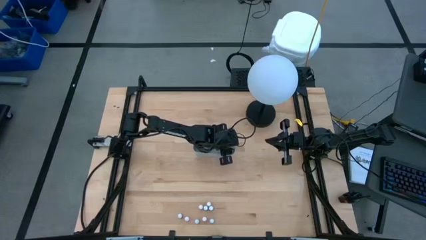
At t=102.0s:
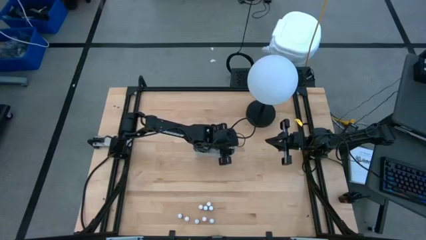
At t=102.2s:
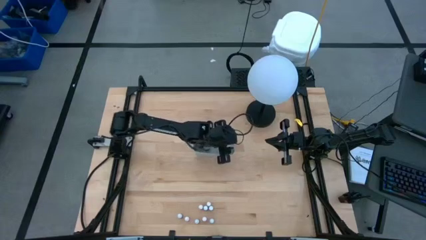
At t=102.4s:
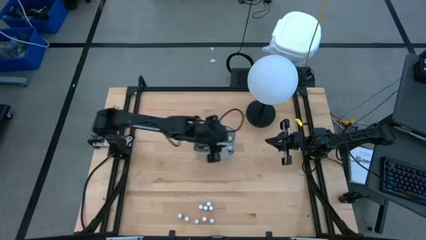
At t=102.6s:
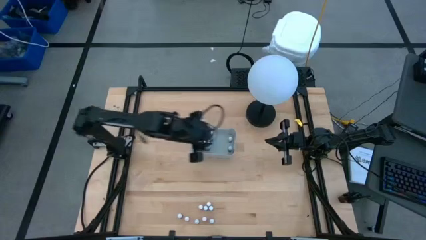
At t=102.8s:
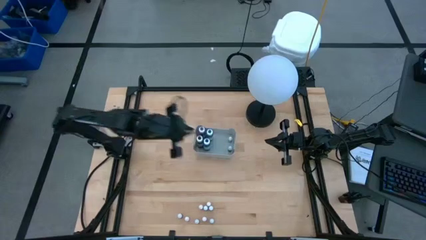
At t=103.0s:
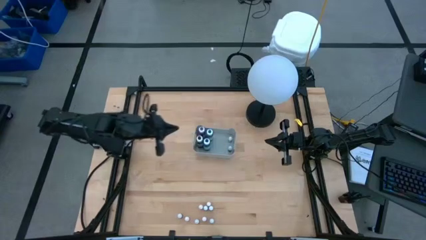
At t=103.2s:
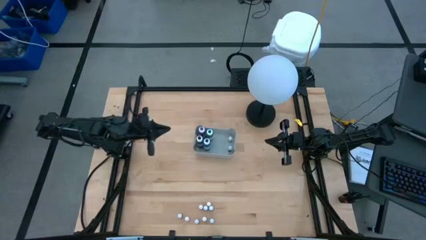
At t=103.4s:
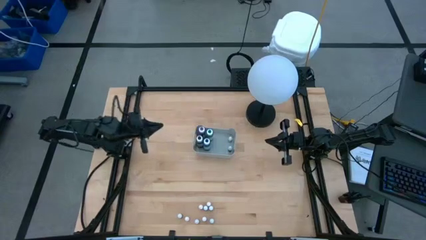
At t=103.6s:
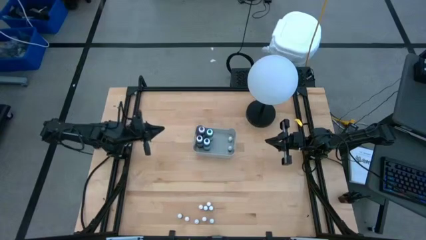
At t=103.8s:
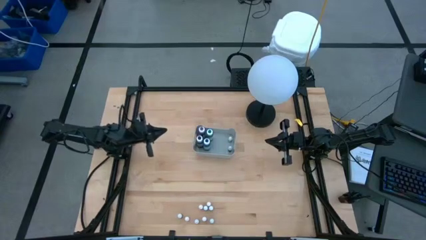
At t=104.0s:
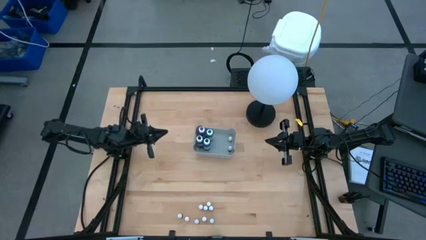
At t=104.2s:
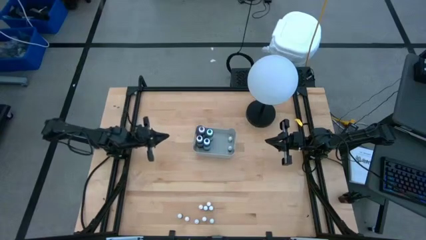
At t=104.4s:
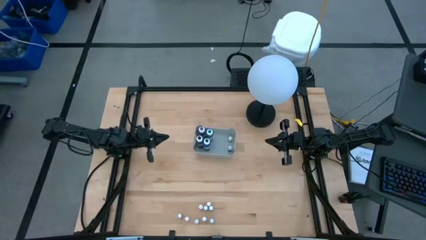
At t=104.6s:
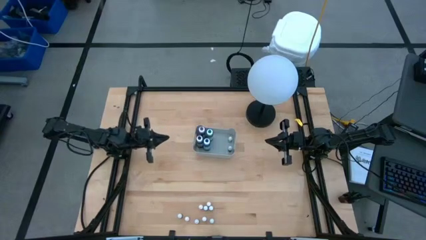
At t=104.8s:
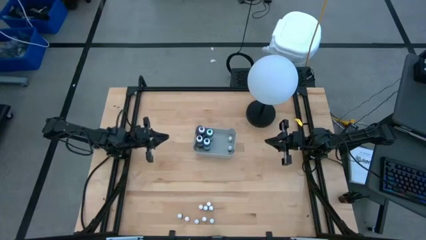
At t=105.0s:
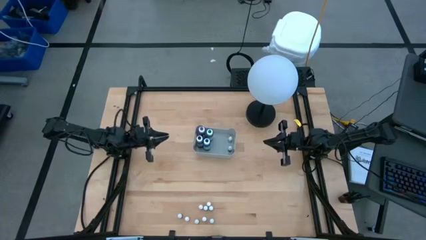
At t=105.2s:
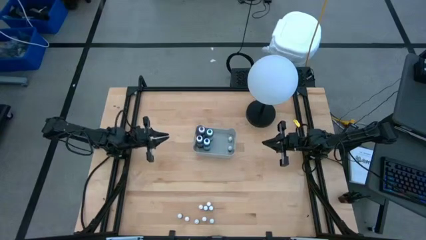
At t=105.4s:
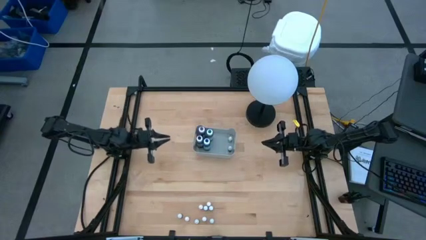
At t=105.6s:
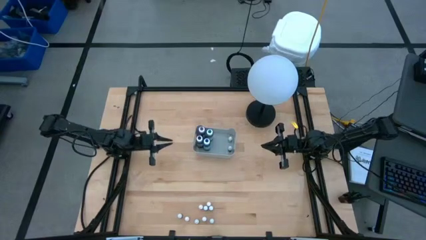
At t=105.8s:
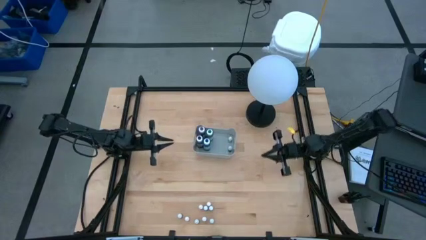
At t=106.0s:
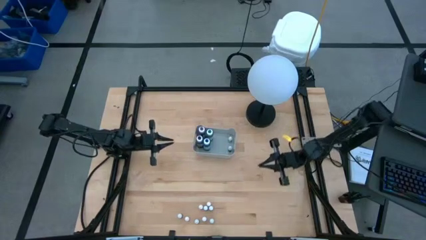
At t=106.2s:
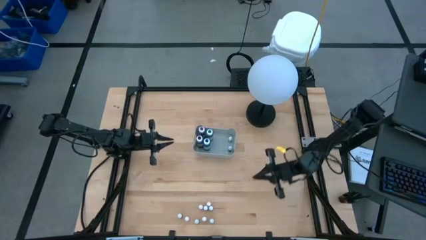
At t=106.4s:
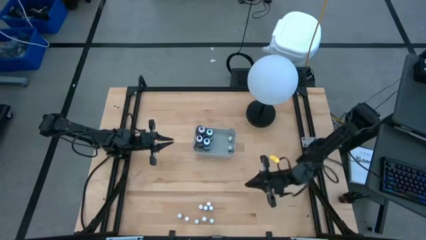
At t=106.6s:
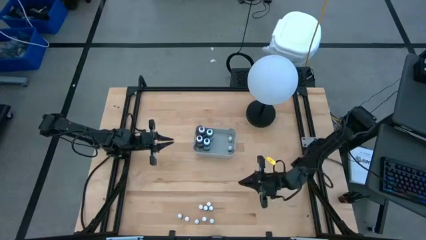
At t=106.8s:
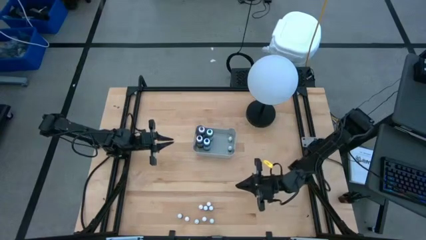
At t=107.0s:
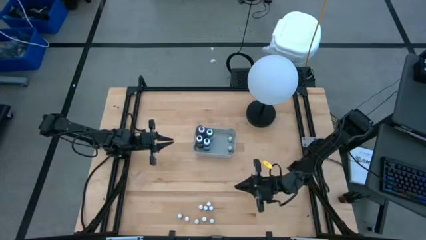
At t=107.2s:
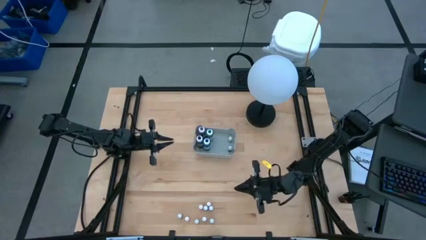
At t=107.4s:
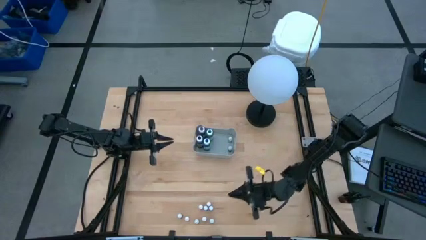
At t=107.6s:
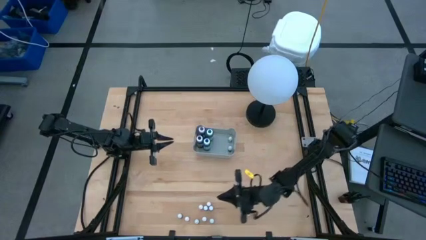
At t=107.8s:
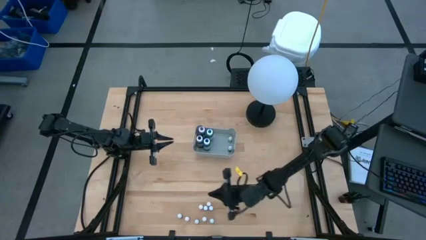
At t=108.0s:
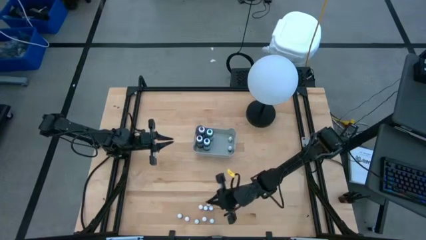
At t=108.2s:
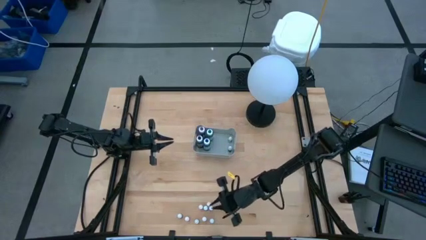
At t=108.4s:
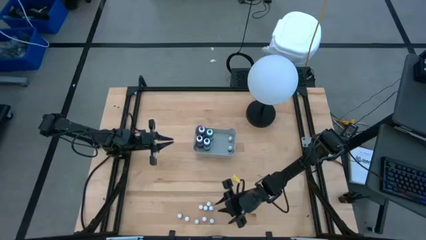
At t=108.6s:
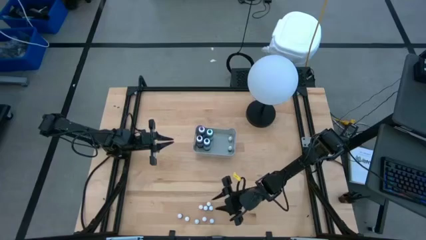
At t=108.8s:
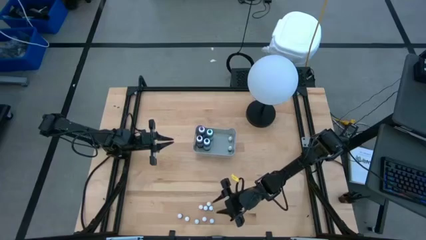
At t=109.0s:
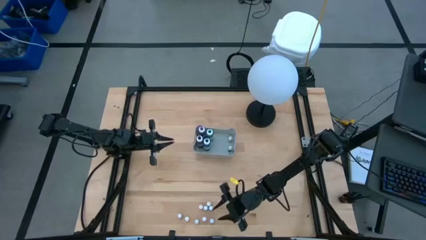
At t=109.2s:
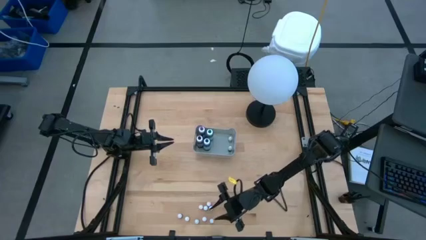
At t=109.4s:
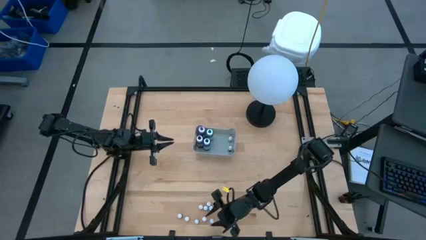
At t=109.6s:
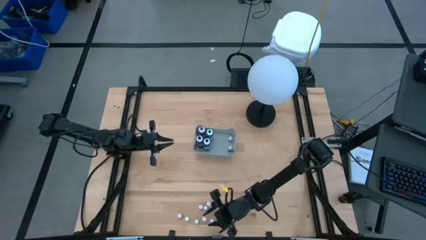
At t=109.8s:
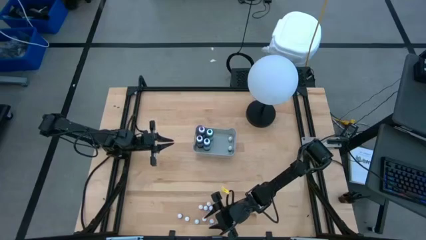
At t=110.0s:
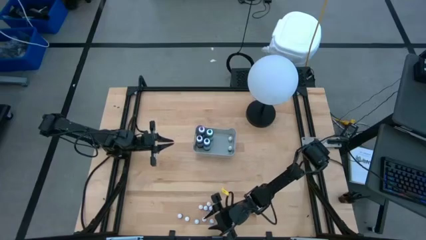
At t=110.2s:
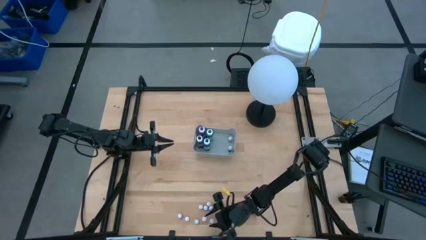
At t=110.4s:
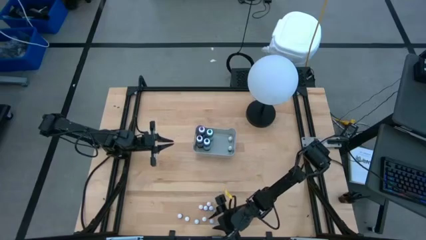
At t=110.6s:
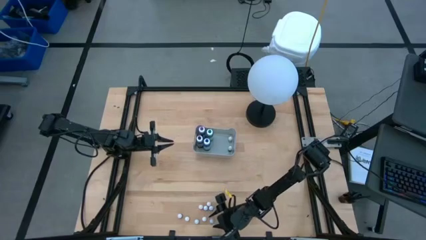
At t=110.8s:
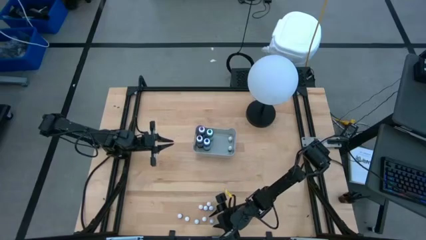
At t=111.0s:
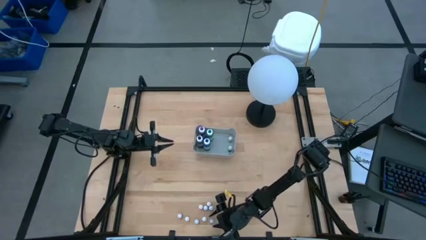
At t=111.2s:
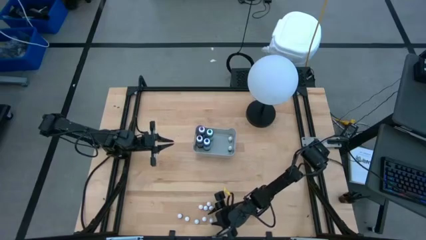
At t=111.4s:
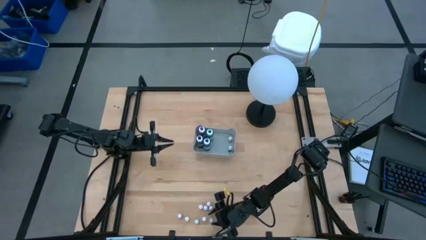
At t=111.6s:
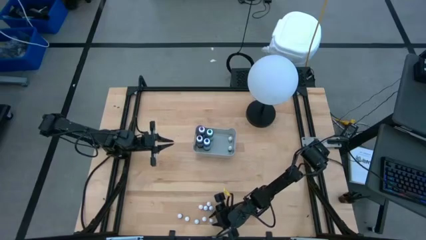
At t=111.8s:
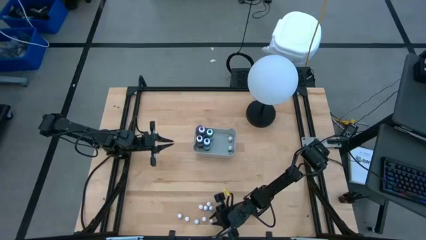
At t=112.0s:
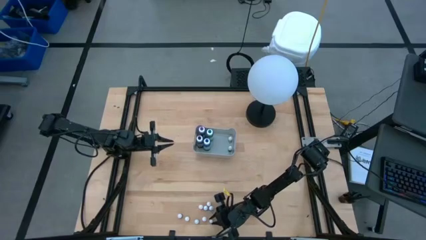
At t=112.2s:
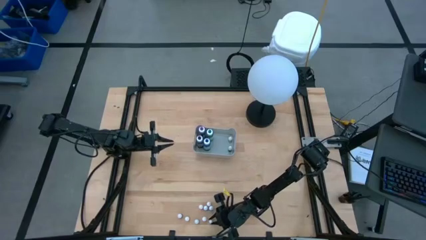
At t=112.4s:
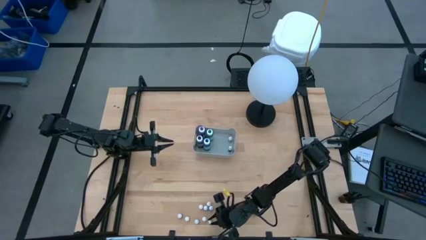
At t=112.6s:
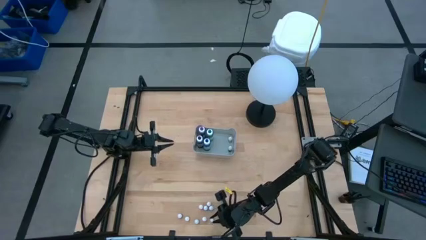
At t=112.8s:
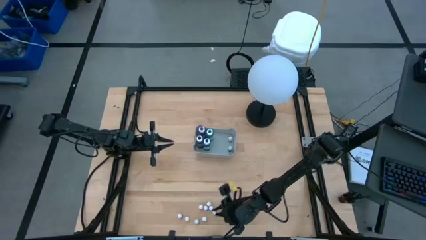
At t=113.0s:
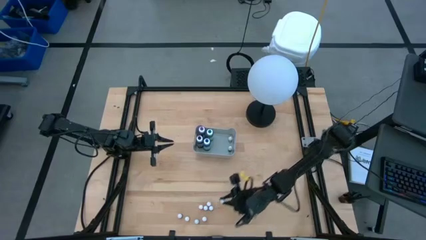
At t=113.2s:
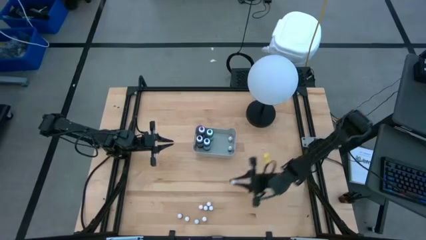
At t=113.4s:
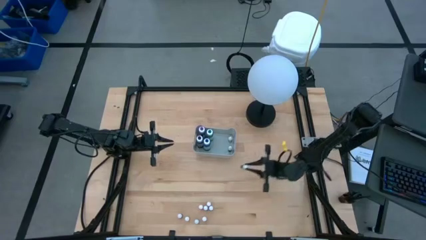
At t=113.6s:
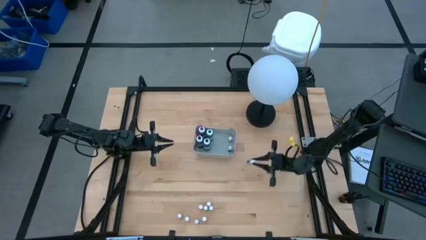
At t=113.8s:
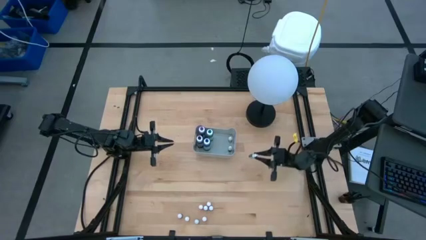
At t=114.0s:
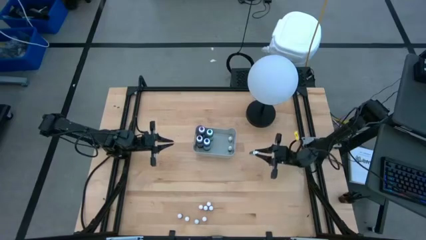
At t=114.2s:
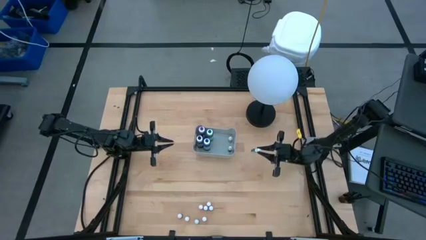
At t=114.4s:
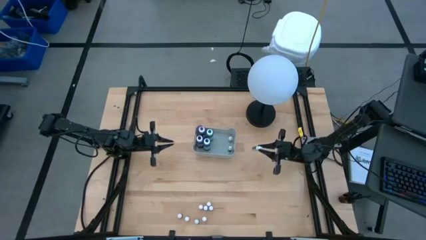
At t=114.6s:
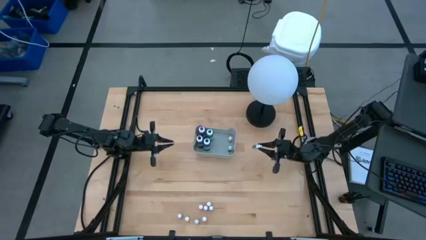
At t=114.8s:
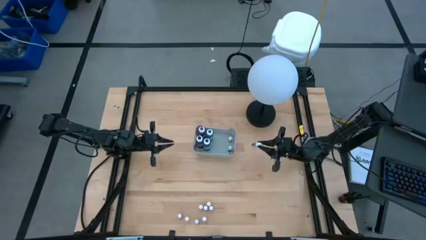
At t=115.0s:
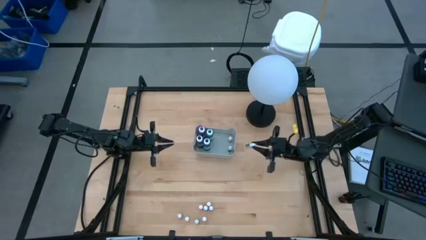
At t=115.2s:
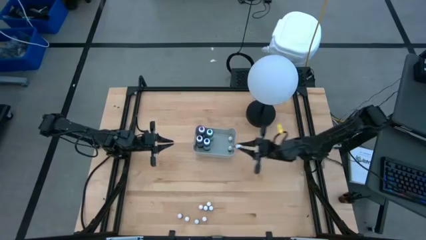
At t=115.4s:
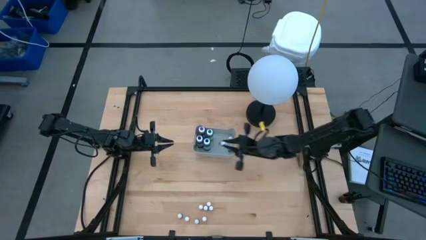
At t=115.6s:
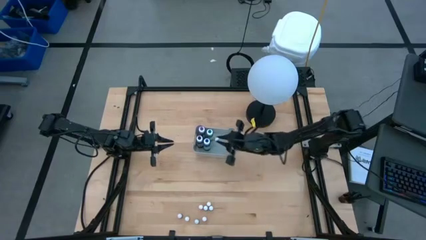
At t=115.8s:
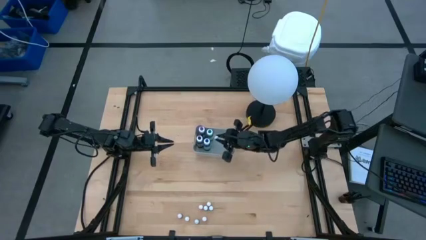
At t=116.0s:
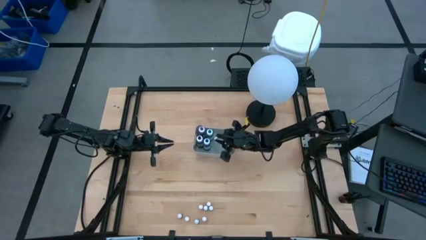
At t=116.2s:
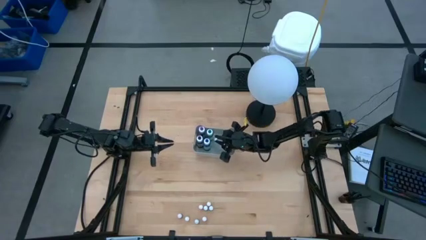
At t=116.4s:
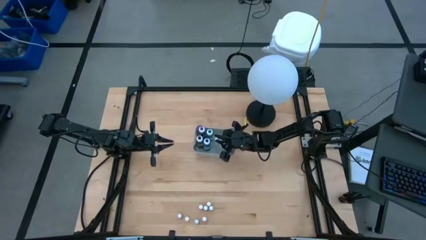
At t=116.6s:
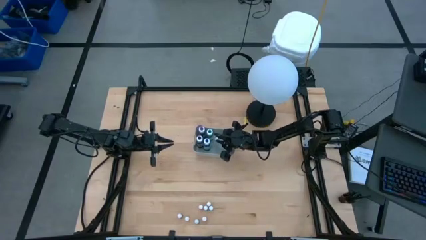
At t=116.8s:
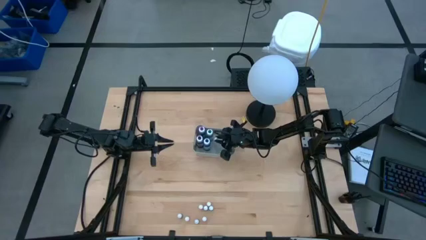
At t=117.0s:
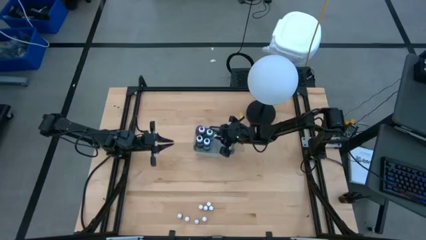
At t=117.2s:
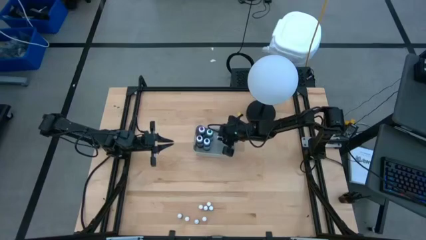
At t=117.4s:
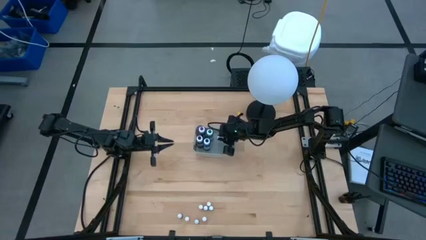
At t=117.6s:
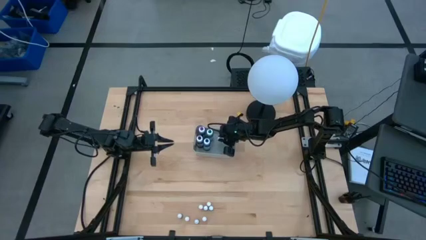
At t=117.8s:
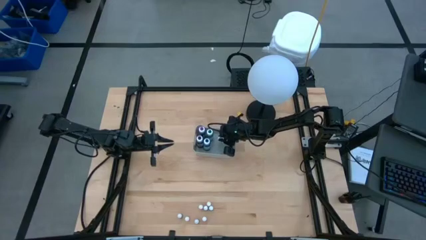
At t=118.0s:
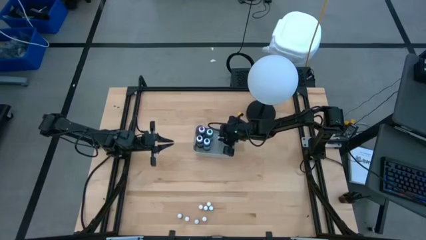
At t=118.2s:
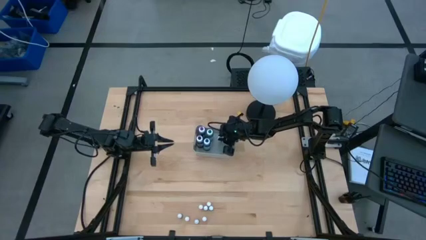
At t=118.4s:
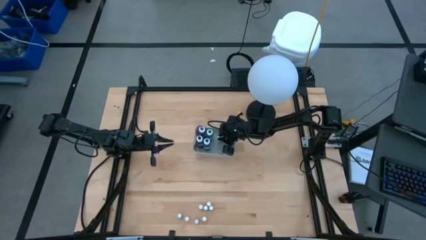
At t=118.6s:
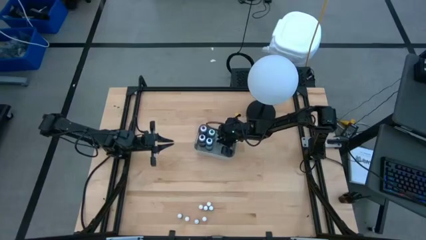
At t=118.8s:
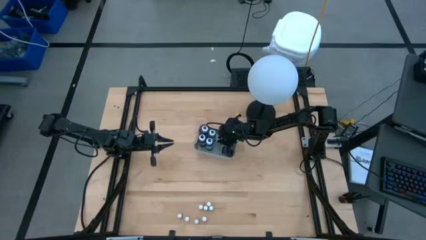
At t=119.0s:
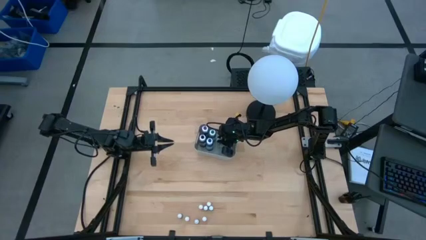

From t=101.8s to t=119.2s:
Task: Pick & Place food coloring
Put the small green food coloring bottle into the gray bin
